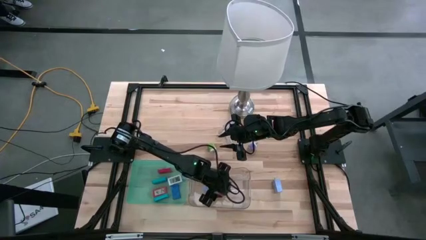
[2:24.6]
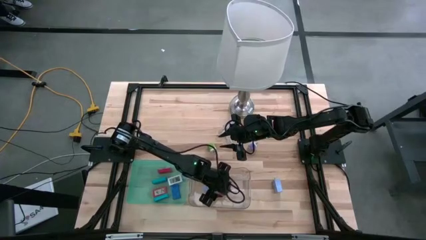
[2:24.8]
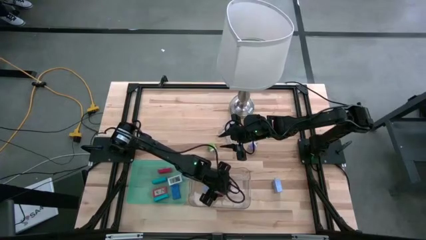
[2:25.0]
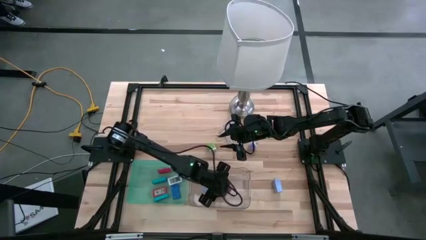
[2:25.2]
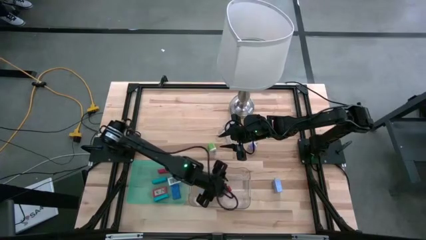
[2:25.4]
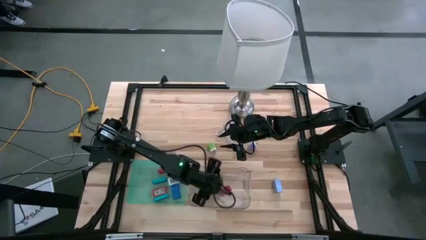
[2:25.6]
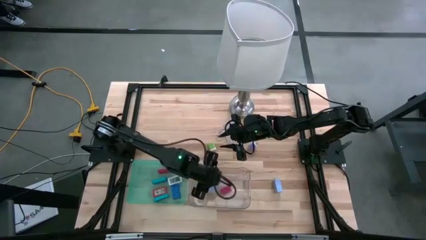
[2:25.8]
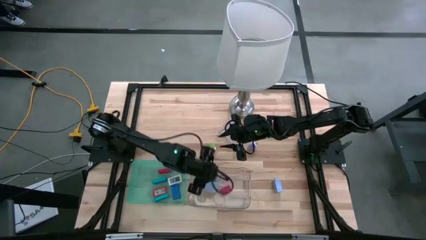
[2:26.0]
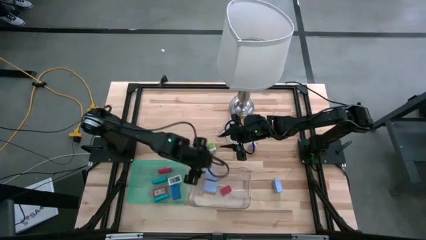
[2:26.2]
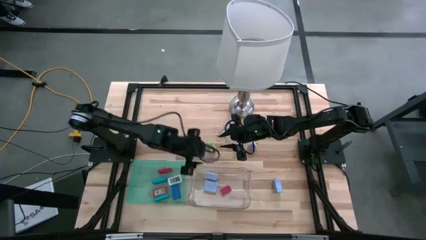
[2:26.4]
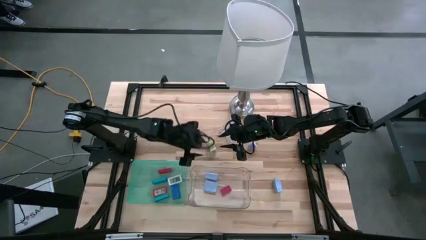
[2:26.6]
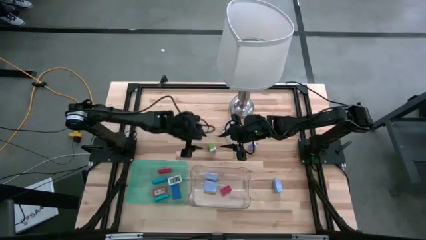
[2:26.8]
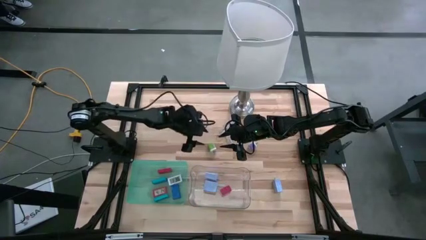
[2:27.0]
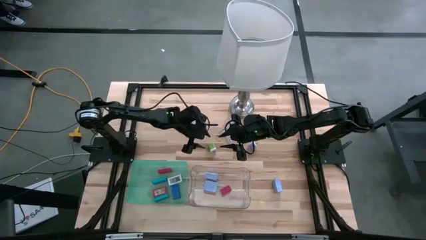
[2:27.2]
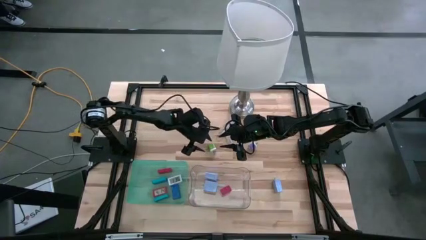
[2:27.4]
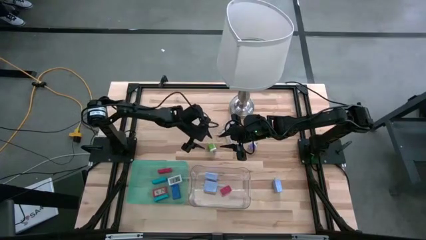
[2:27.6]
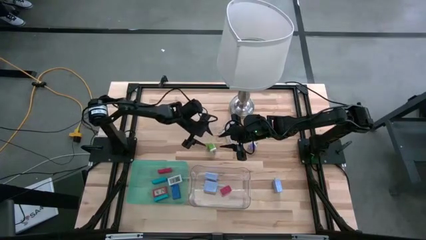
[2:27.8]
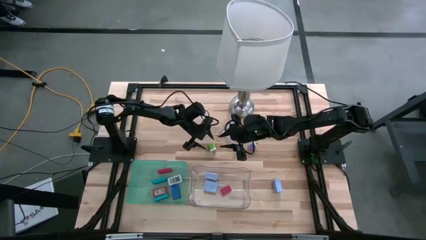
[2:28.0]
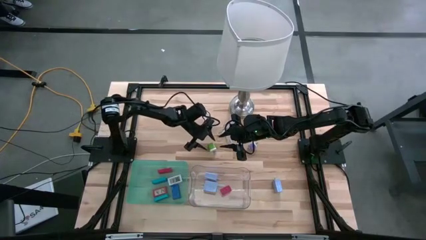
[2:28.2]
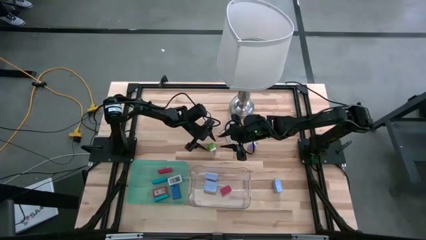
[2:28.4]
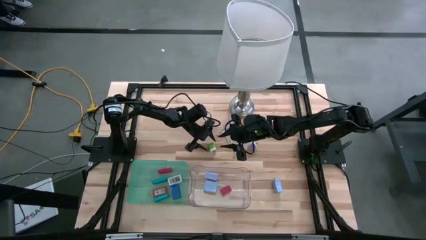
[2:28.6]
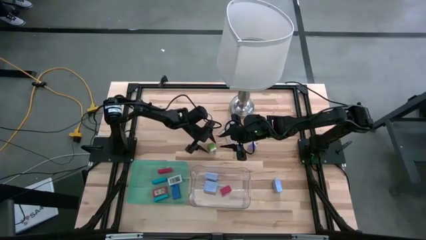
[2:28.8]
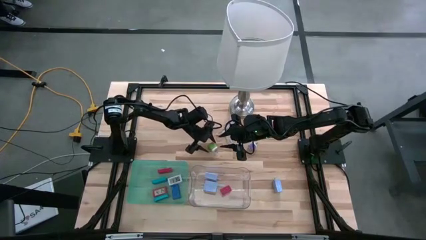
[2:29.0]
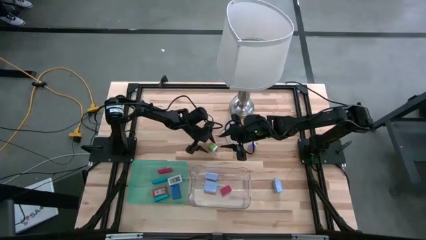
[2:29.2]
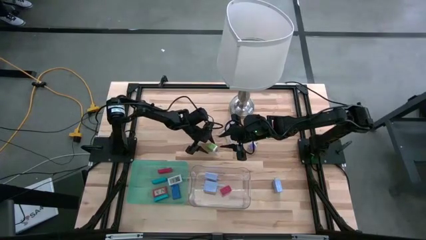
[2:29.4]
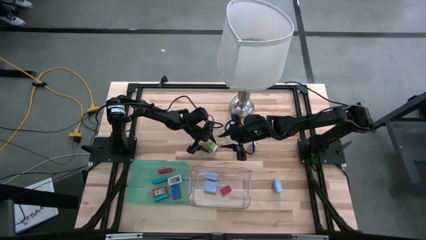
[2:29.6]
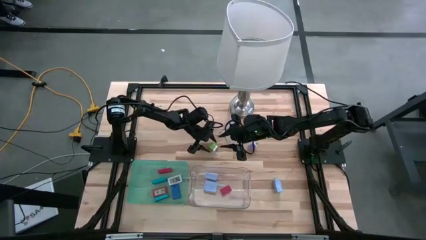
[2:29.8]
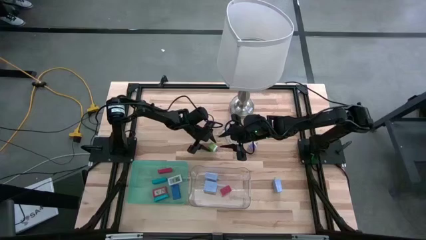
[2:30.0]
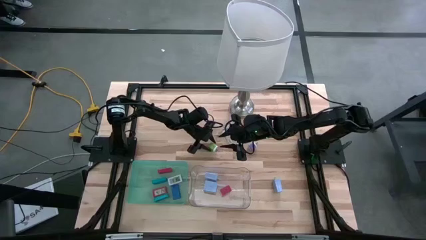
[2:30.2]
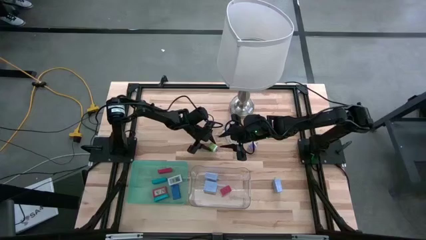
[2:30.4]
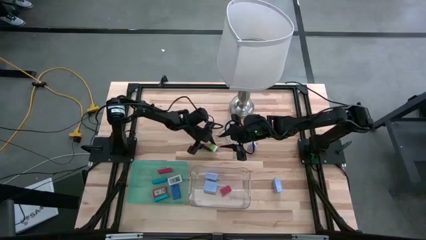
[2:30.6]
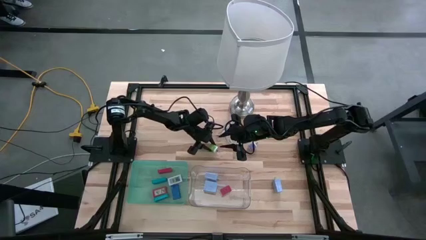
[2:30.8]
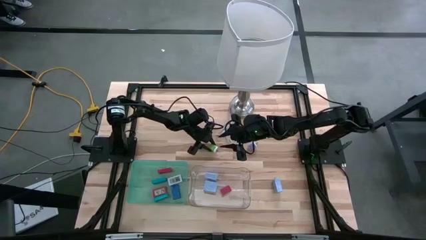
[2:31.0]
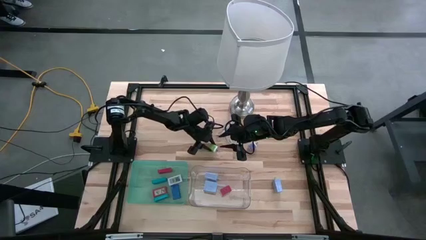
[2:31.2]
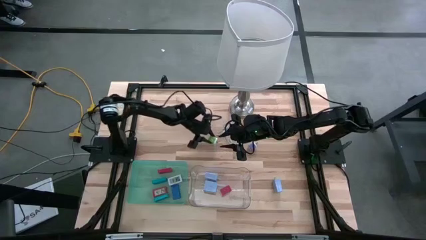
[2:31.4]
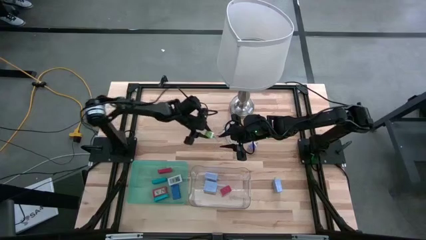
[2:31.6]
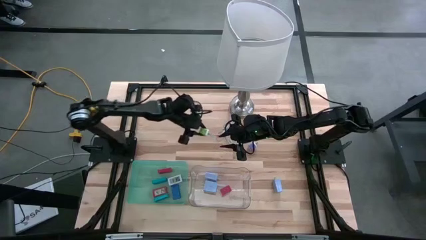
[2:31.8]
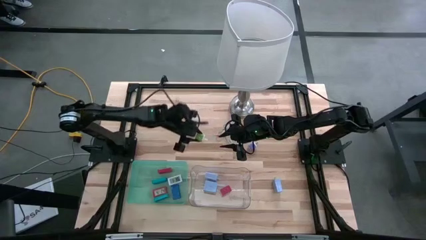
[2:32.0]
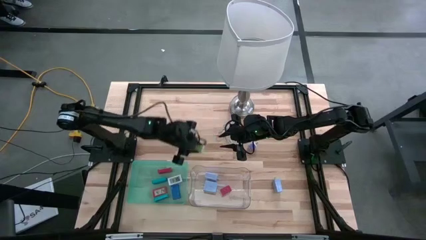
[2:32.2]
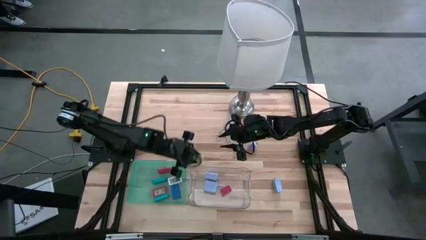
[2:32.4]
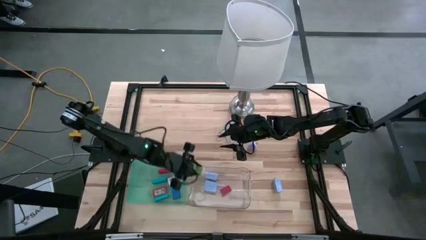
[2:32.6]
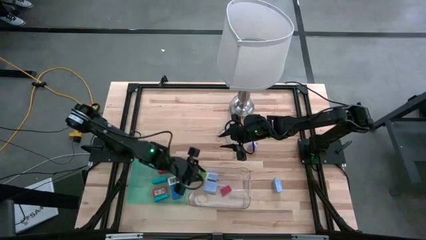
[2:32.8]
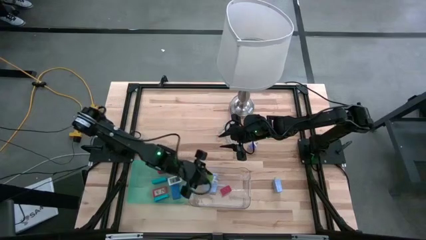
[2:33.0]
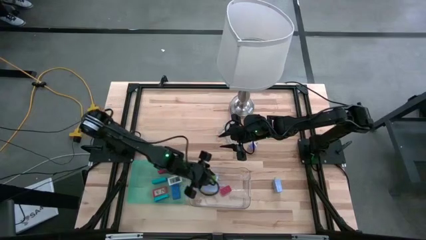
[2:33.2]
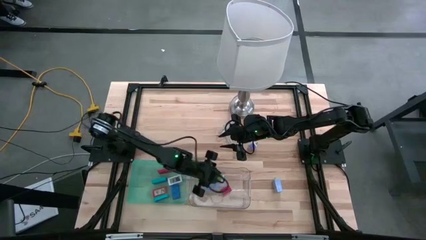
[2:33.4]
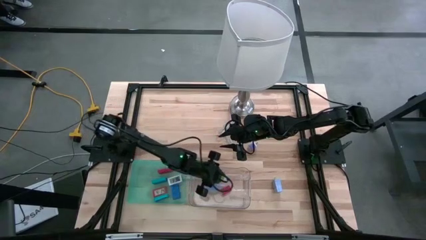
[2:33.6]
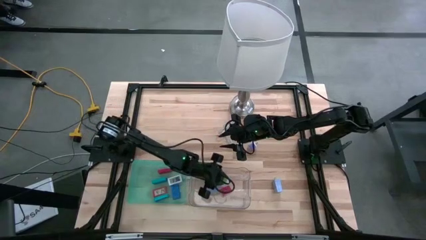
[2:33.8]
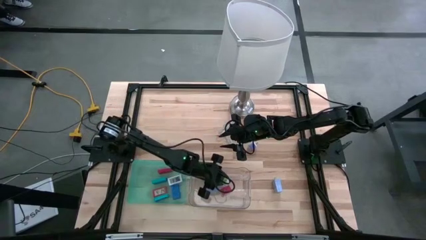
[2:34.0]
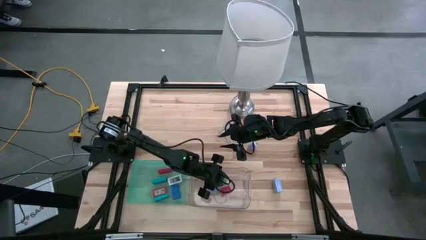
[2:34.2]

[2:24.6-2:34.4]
Task: Pick & Place Office items
Put the left green charger adapter into the transparent bin

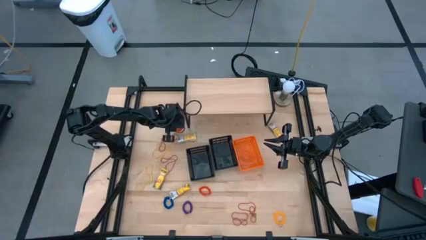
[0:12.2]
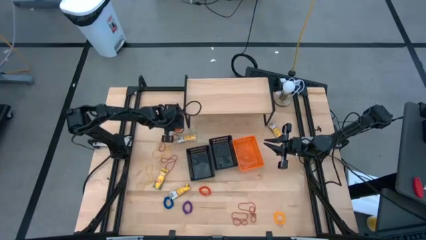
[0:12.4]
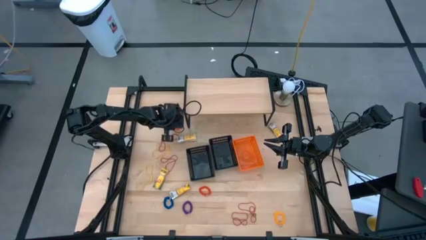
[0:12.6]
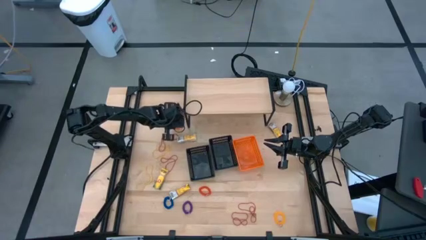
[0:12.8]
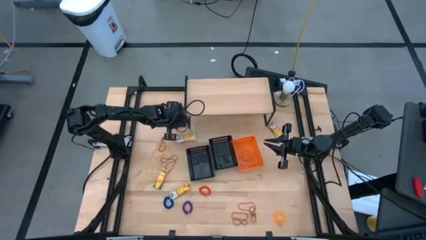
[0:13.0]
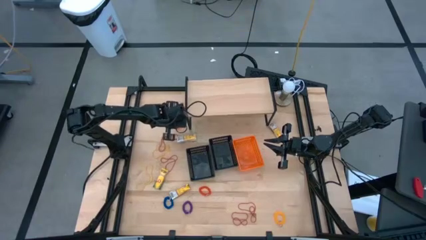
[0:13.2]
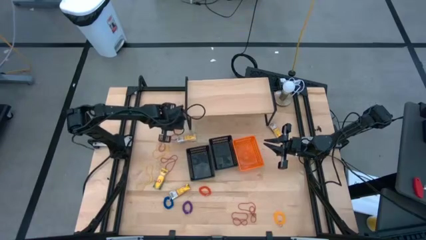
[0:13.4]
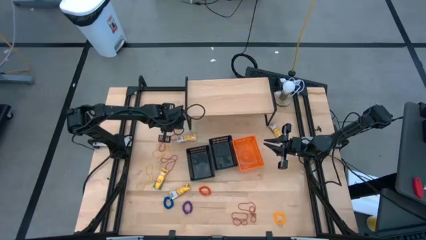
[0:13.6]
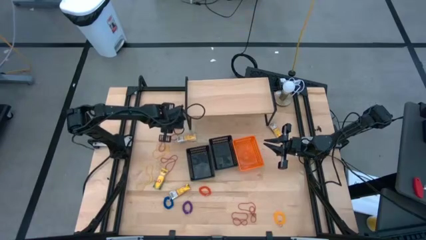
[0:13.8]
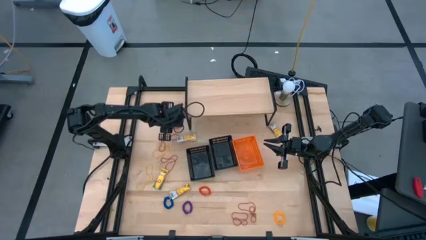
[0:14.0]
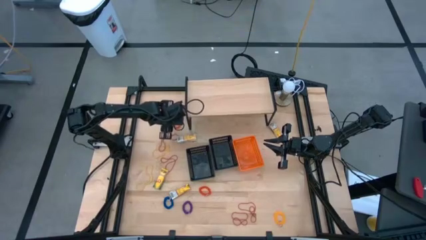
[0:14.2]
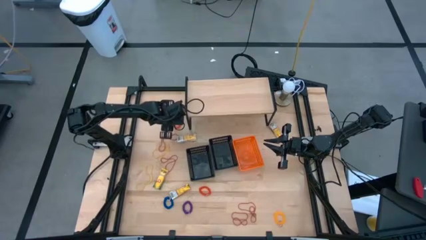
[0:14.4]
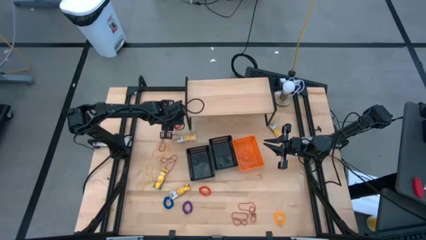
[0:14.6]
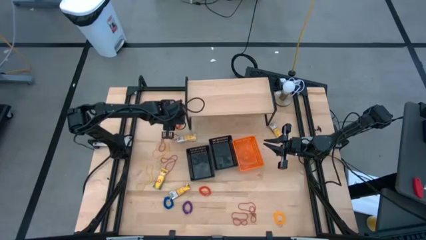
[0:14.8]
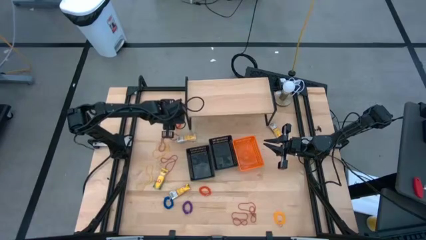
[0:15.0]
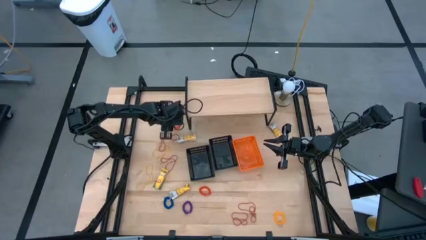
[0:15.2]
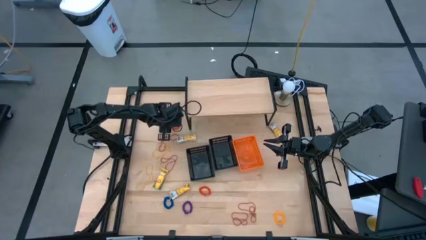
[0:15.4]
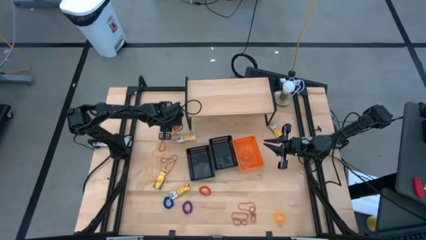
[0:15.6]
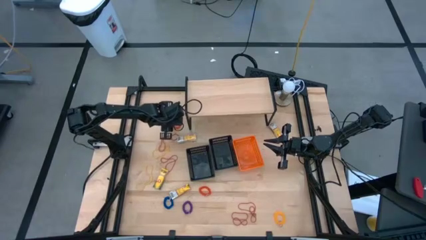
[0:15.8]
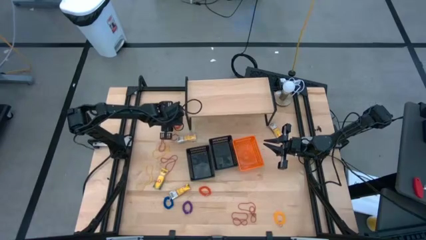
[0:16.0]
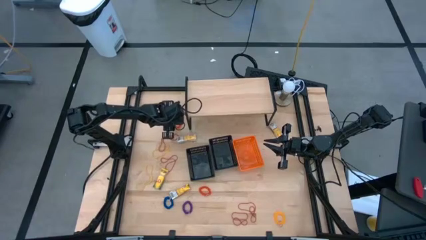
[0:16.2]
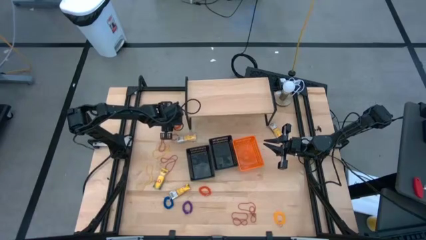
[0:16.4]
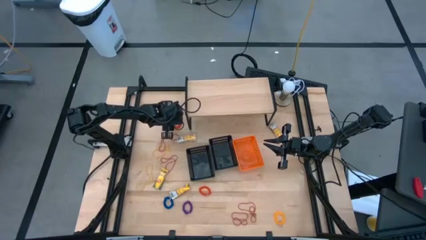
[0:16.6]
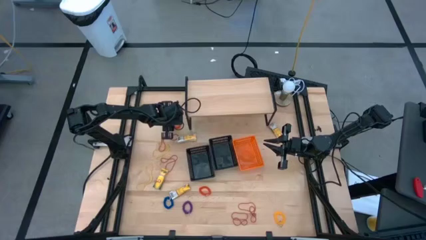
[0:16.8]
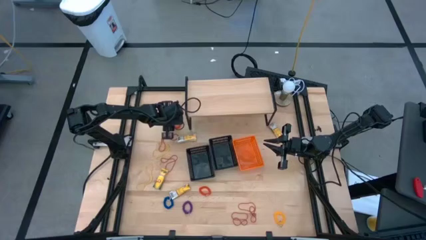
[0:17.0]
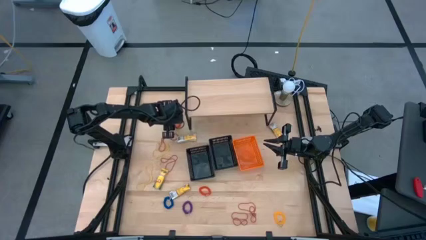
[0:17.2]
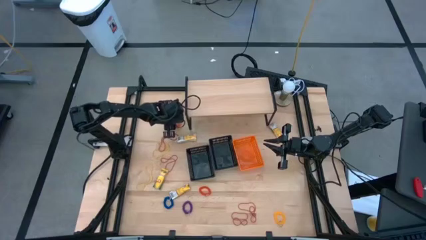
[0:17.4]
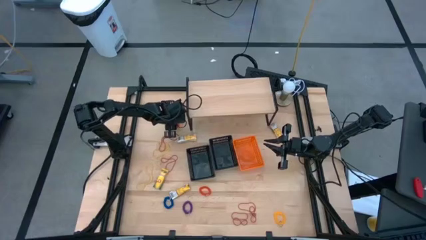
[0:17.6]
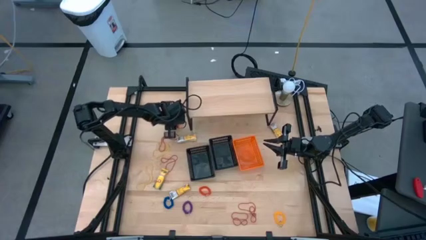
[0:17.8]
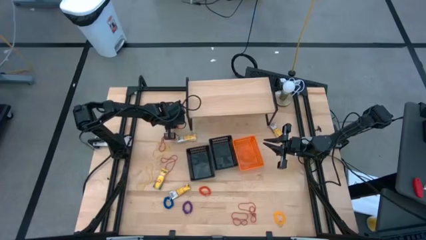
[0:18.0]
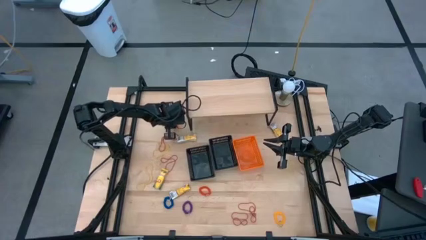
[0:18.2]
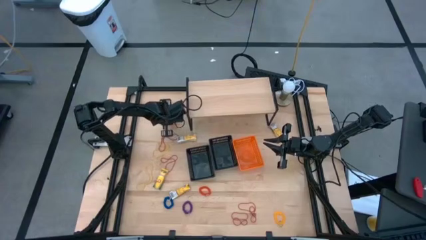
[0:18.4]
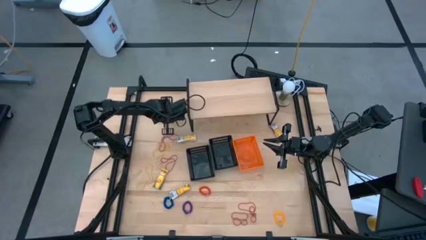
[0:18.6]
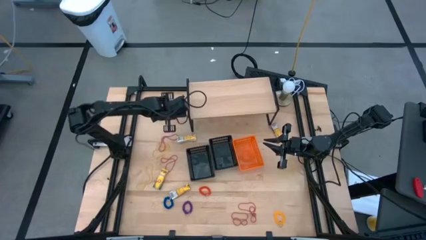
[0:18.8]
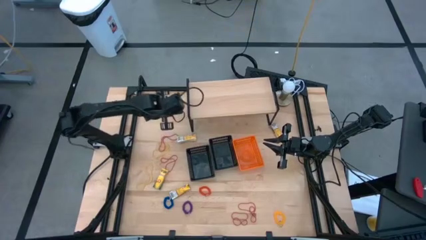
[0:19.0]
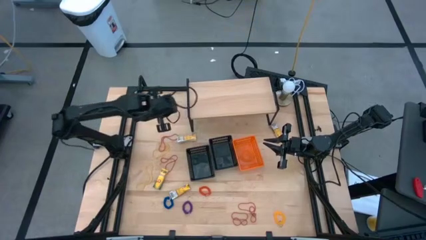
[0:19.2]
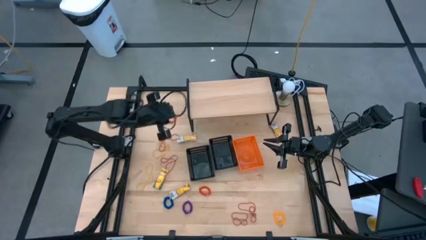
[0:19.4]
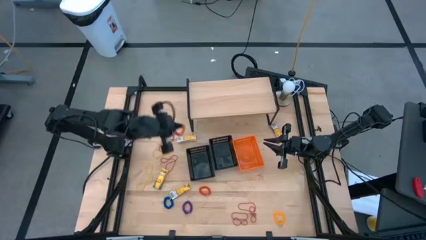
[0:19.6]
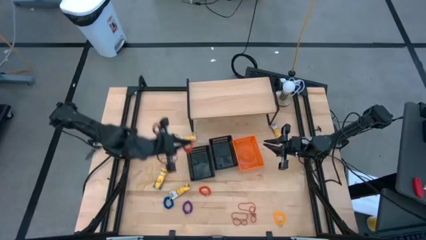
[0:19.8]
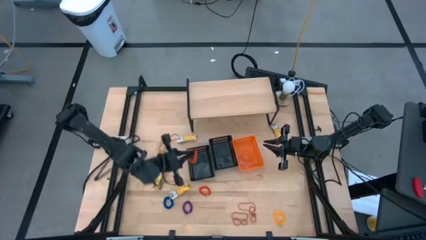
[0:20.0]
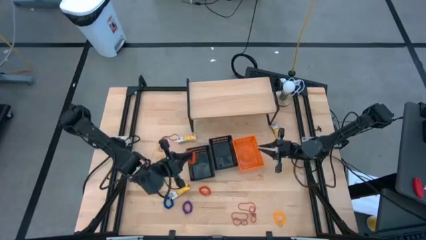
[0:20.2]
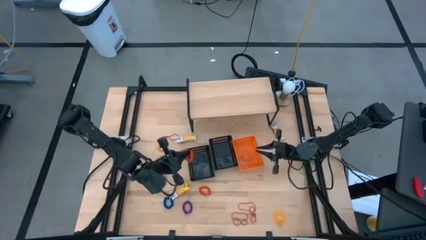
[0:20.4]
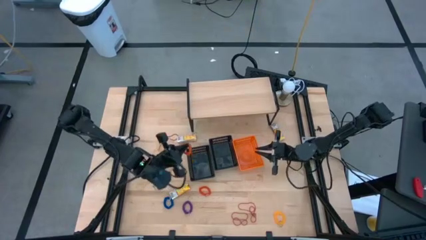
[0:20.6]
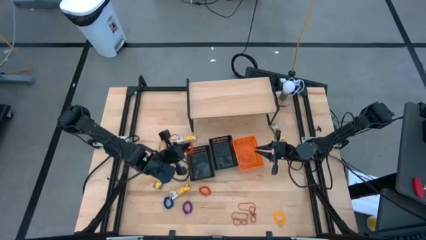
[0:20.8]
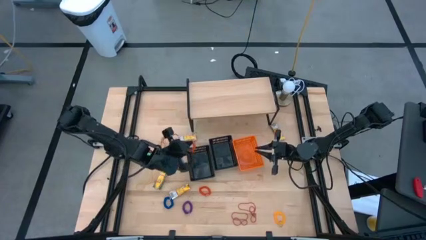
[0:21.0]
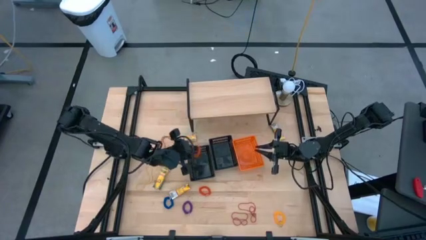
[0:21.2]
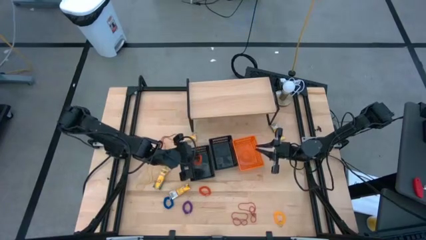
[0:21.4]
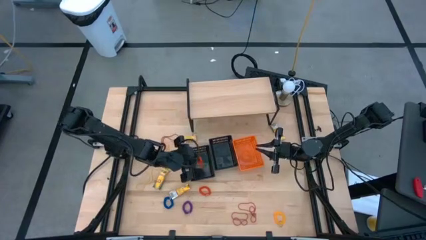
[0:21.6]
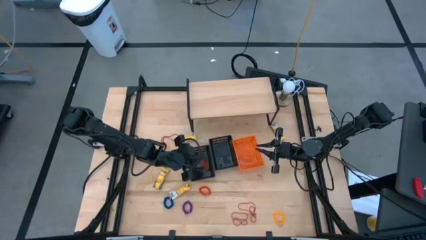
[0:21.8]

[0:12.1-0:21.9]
Task: Pick & Place Office Desk Supplies
Put the top orange spiral keychain into the left black bin
